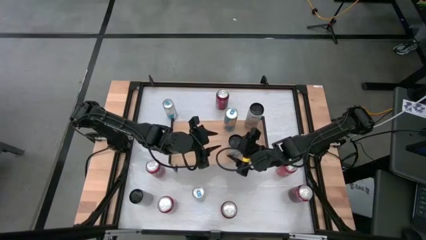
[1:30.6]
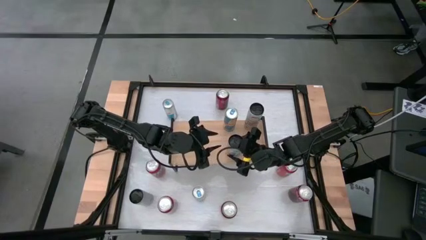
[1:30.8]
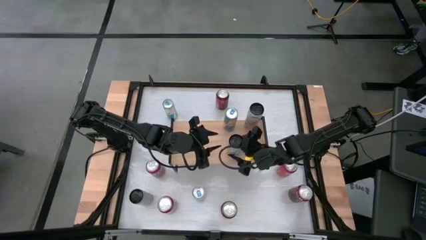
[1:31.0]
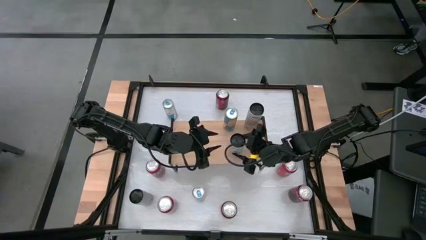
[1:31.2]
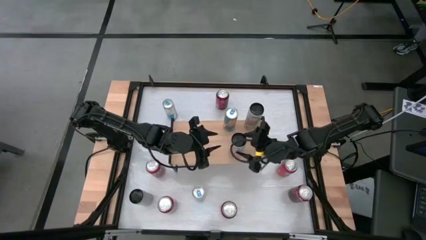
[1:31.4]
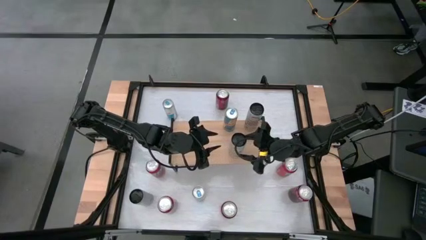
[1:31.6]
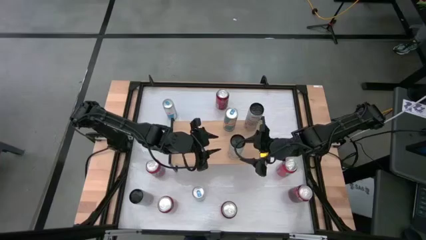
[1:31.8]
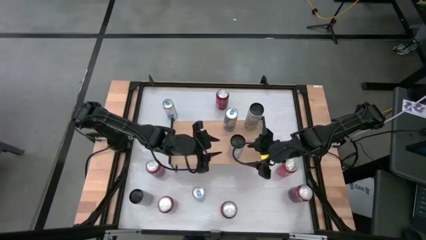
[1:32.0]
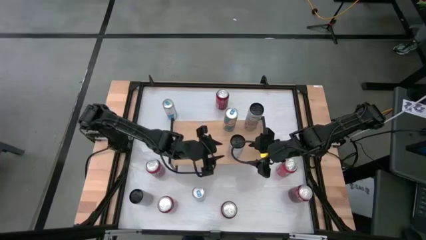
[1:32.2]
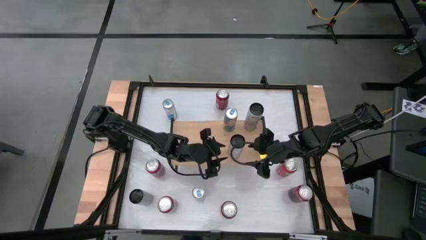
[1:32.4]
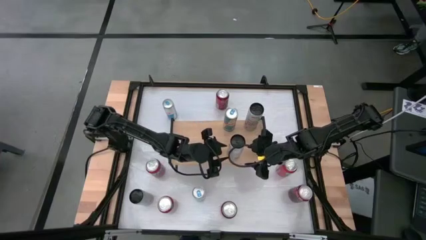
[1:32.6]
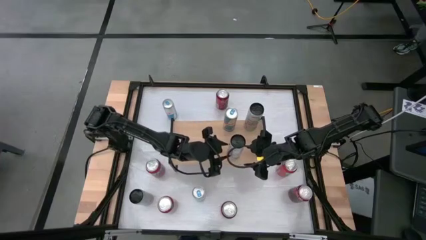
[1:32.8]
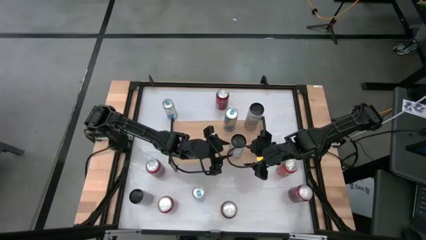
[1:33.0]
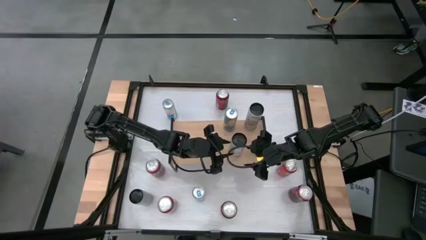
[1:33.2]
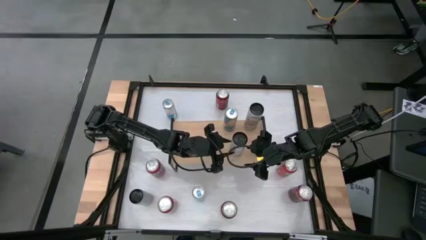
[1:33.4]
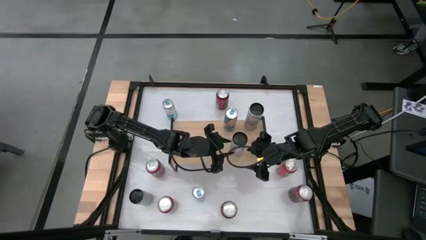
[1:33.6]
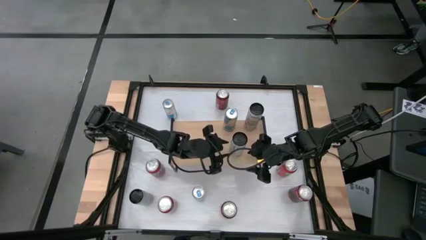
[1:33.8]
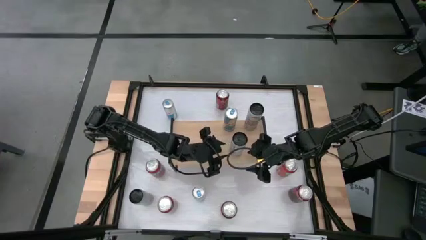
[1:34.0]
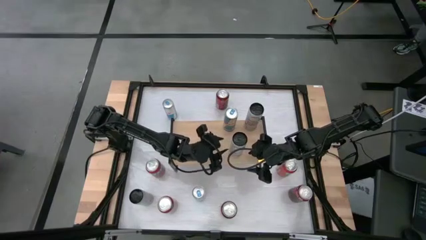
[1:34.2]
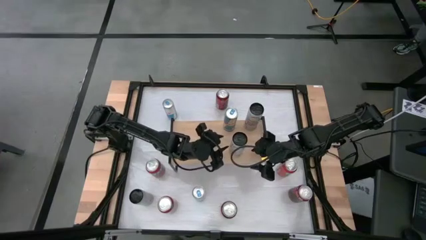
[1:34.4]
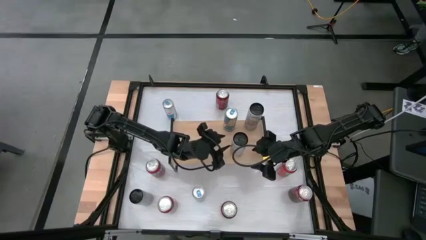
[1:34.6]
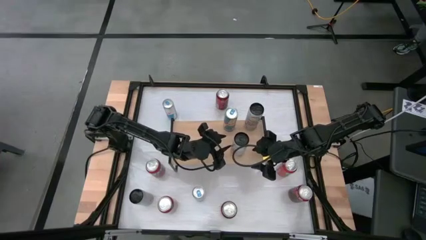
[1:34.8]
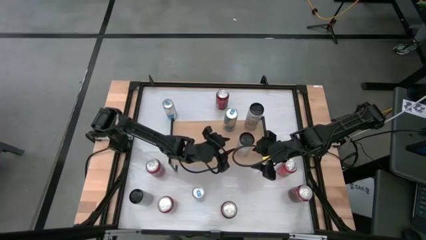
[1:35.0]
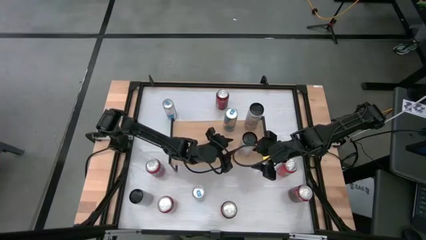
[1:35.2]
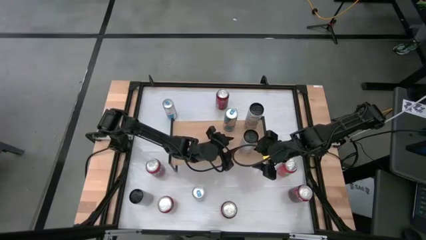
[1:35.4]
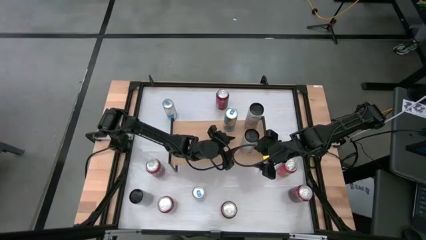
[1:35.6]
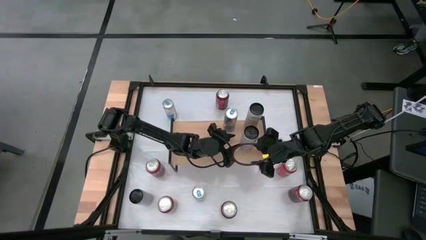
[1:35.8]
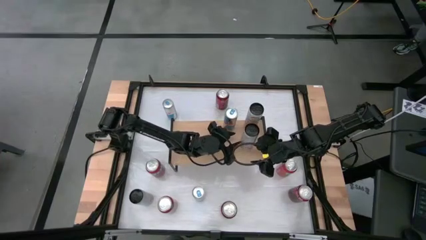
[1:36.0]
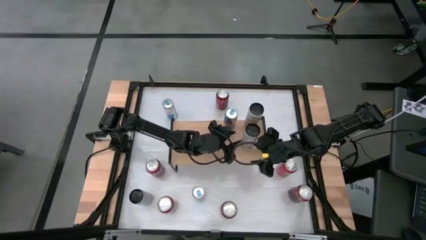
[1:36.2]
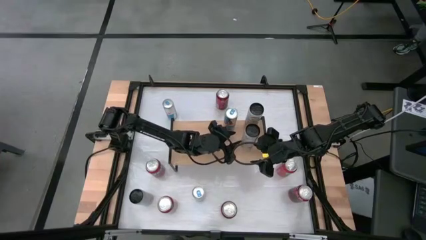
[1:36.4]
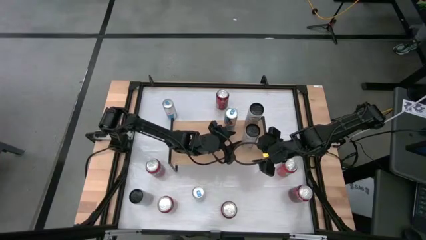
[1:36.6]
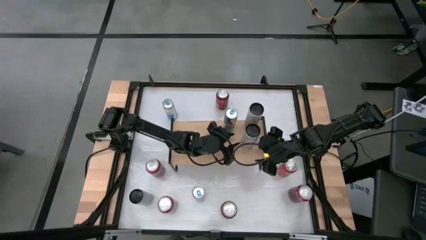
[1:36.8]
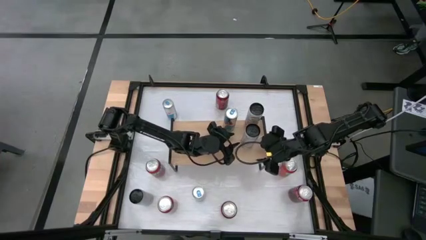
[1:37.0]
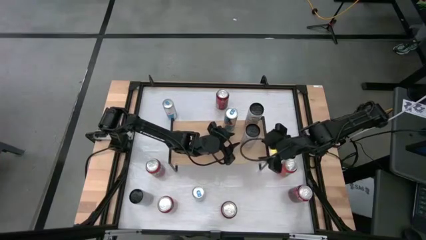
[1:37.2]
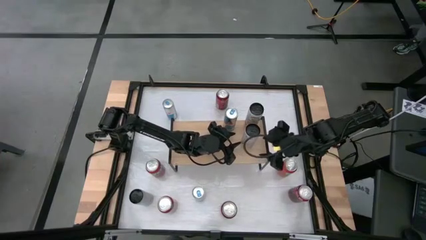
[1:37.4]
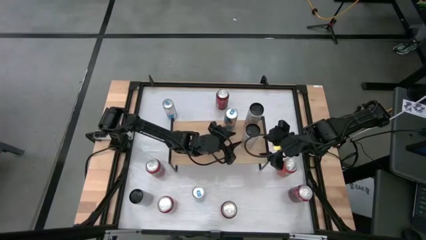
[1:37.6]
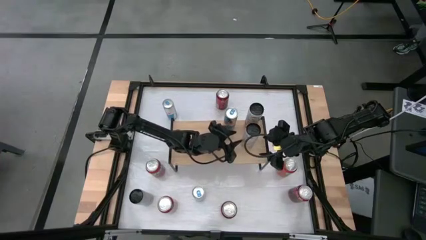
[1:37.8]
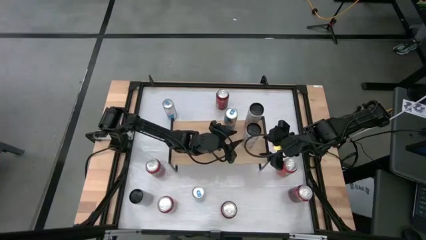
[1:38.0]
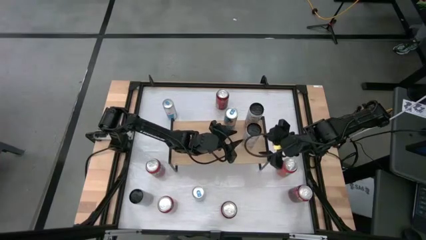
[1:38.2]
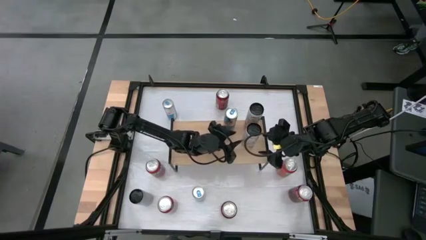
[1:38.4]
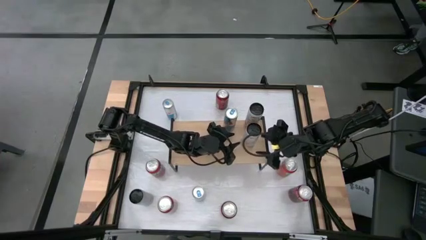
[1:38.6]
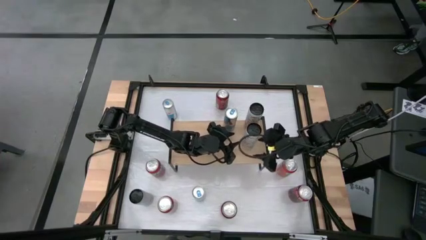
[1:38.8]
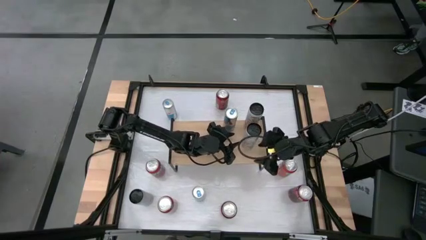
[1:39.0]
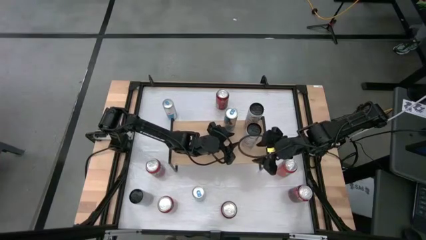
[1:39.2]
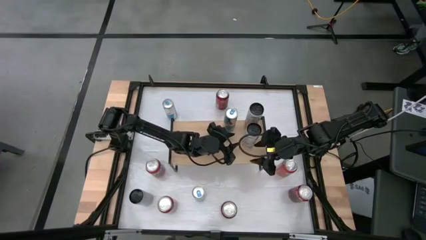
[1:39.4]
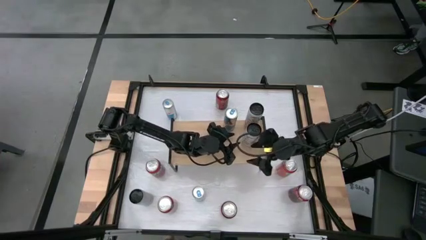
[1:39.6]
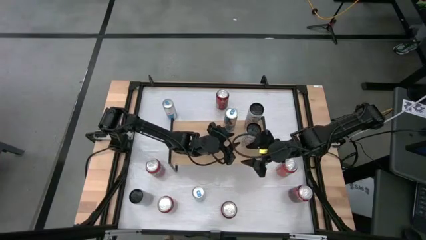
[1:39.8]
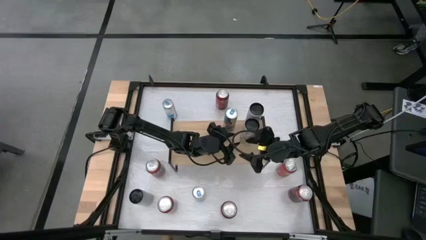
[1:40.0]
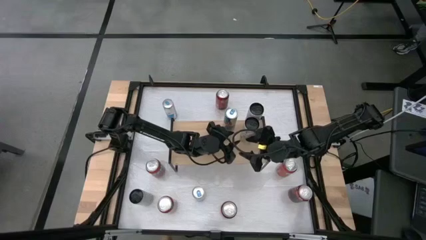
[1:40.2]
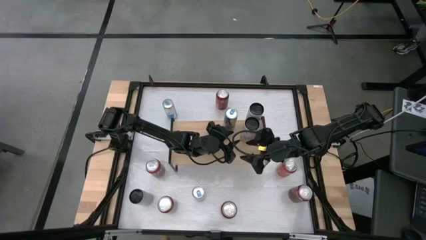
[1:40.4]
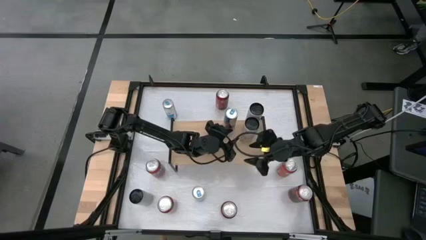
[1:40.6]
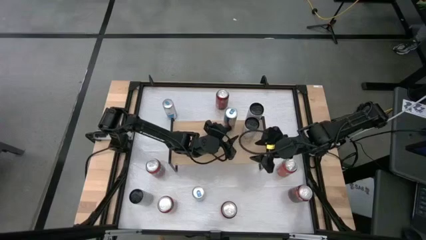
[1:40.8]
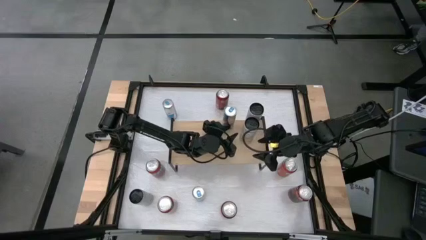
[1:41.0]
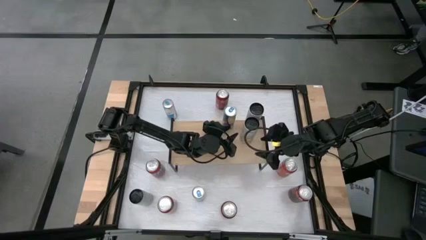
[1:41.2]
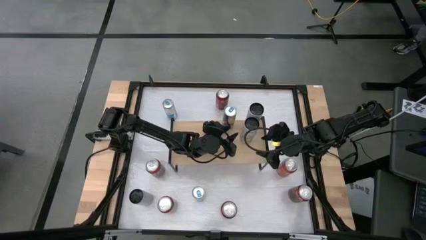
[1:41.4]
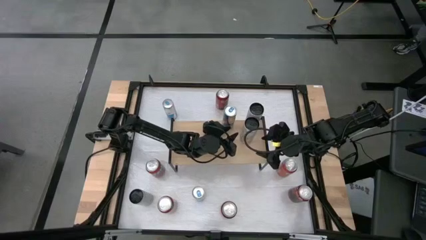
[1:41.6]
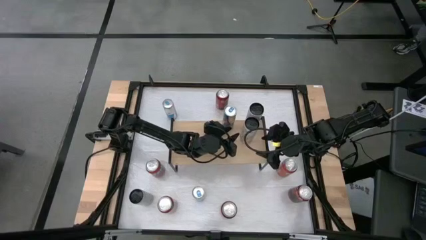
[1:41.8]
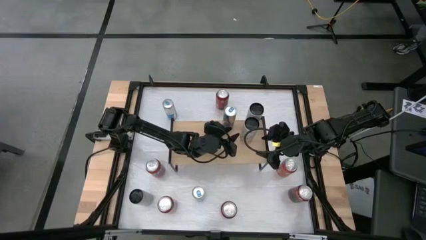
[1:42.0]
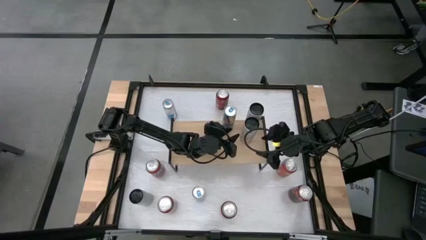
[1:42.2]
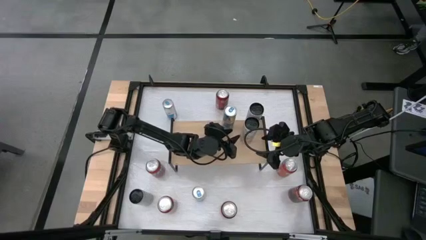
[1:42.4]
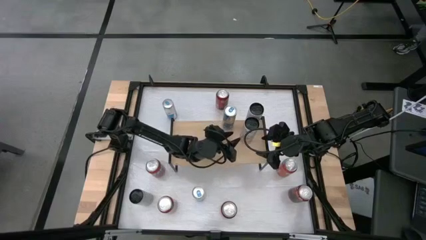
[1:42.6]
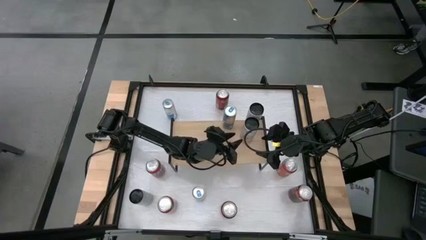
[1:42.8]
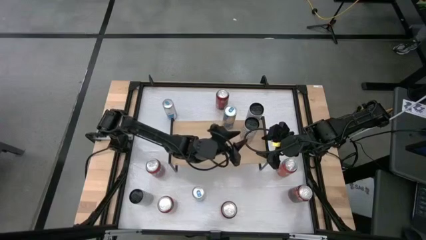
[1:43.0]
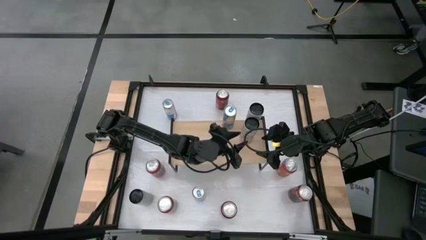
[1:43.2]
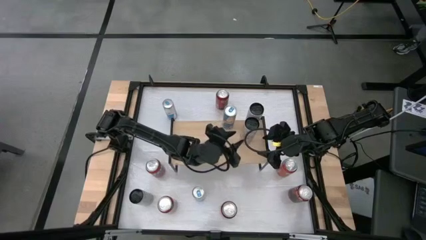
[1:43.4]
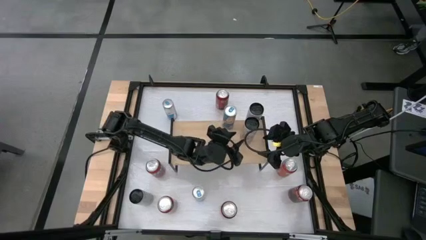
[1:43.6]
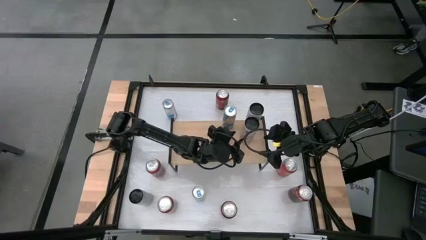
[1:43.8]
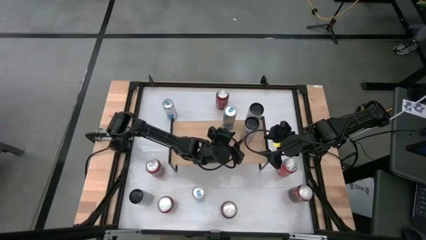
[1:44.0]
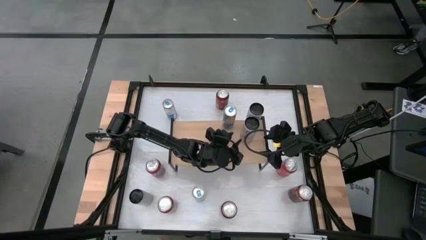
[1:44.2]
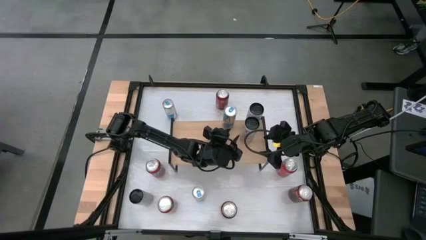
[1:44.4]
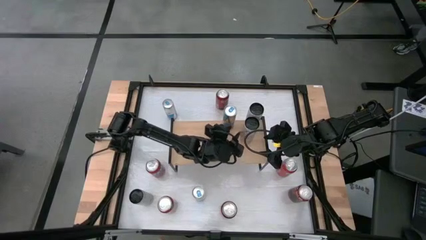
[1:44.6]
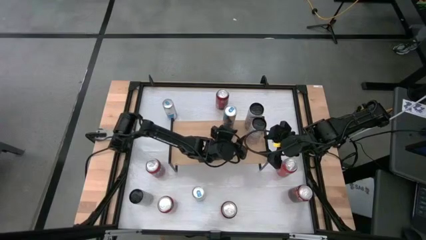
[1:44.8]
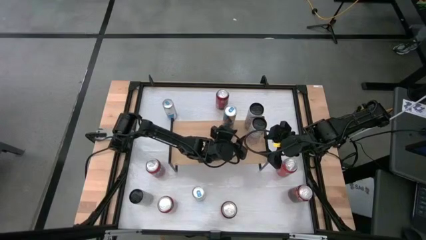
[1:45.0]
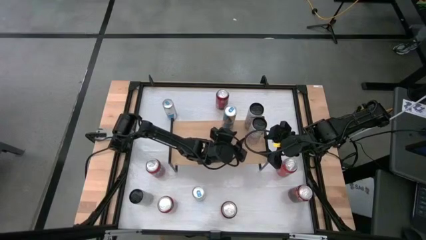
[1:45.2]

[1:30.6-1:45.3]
Task: Place canned beverage on shelf
Put the right white-pink soda can on the shelf aligned with the other white-pink soda can

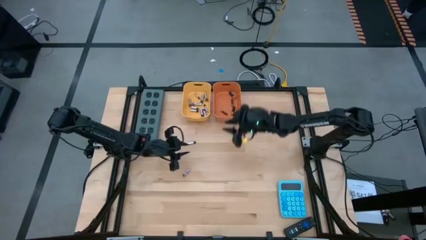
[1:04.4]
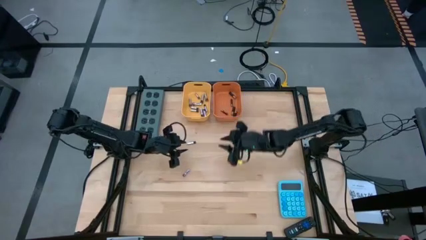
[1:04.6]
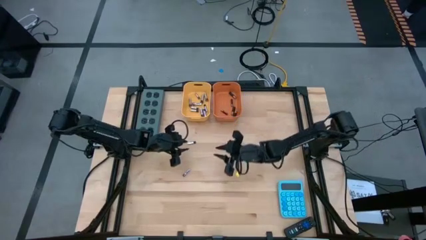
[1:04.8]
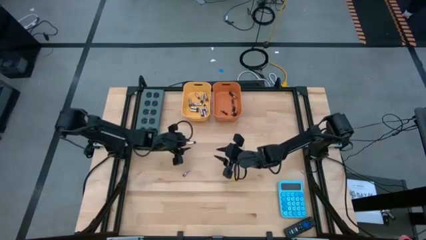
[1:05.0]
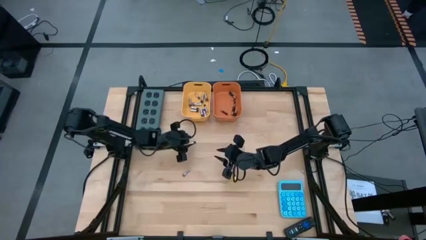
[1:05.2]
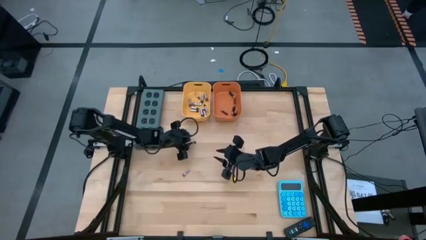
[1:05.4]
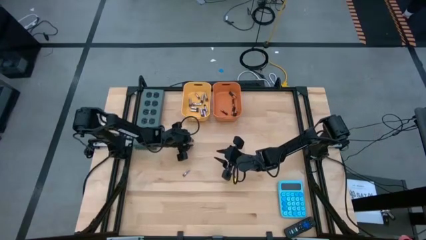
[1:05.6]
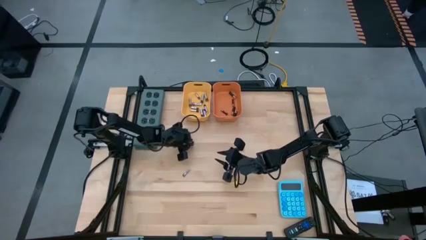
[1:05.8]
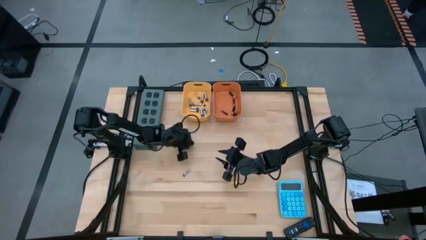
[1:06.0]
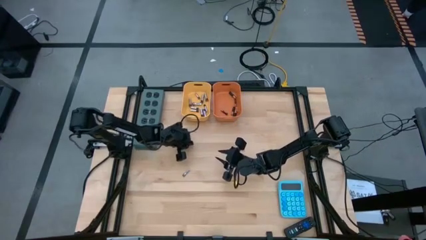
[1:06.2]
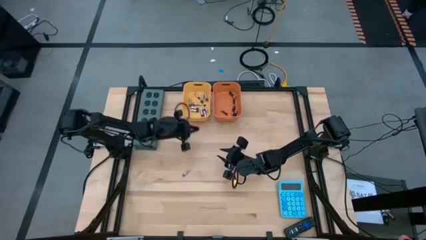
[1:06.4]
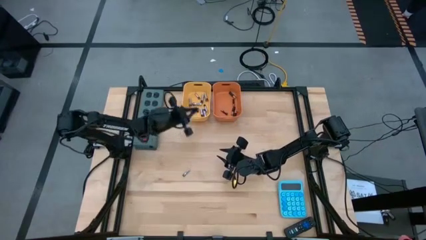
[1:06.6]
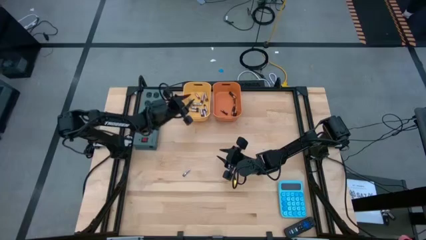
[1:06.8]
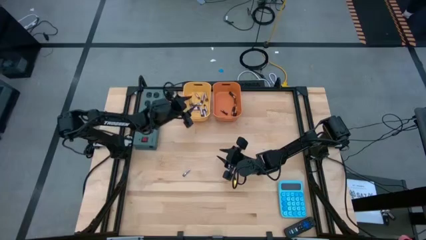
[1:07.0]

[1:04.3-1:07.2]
Task: Sort batteries
Put the silver battery into the yellow bin
